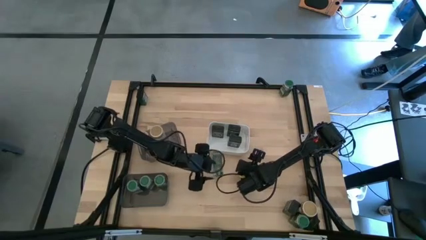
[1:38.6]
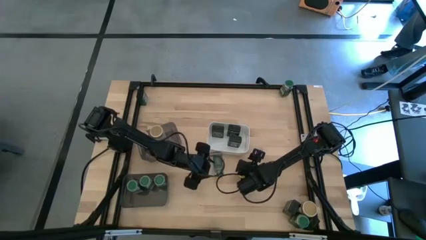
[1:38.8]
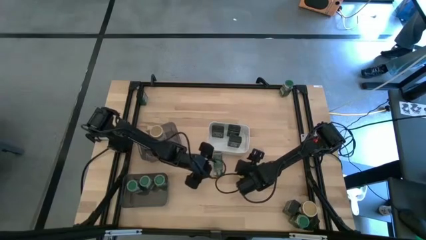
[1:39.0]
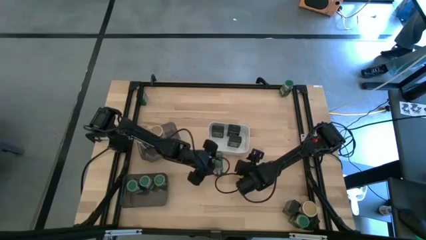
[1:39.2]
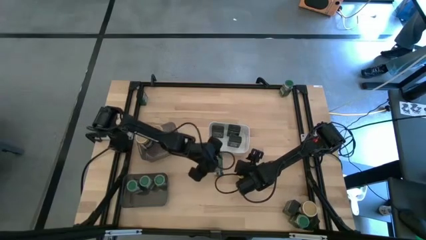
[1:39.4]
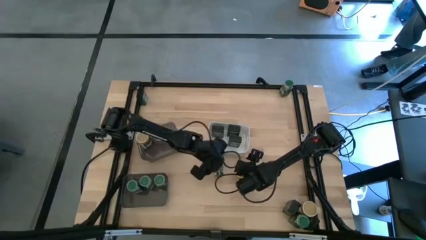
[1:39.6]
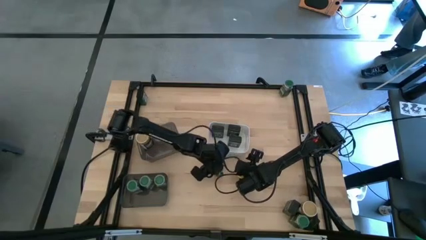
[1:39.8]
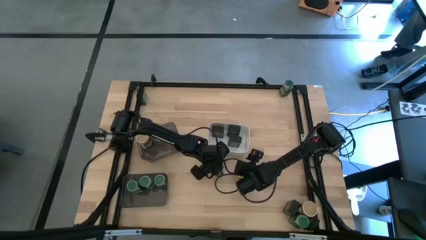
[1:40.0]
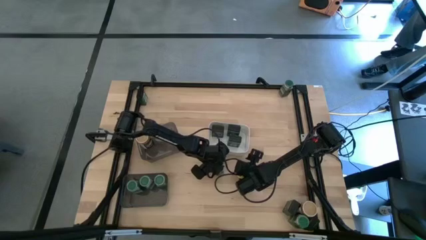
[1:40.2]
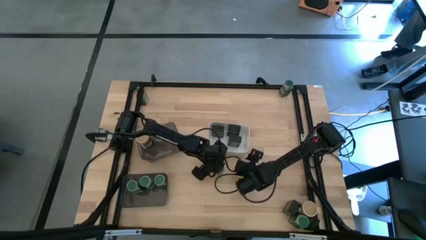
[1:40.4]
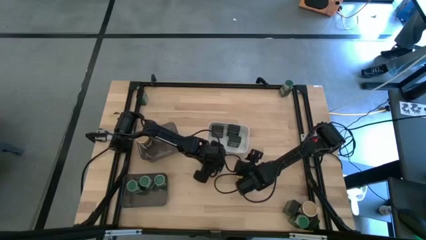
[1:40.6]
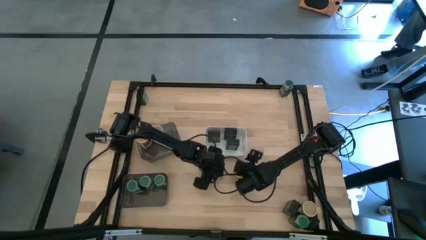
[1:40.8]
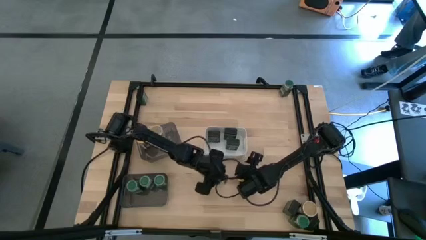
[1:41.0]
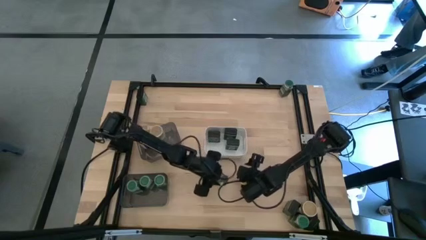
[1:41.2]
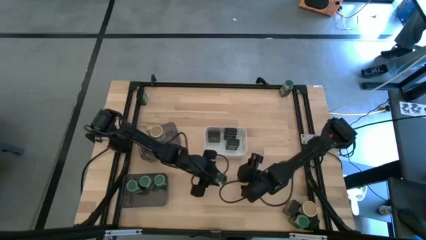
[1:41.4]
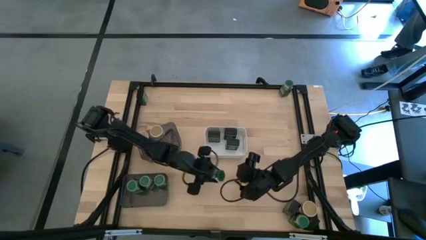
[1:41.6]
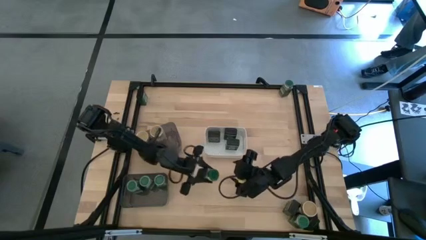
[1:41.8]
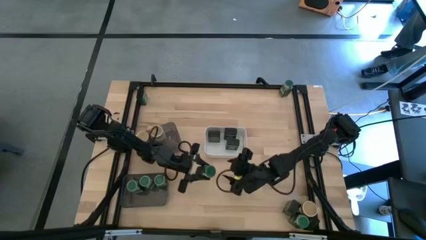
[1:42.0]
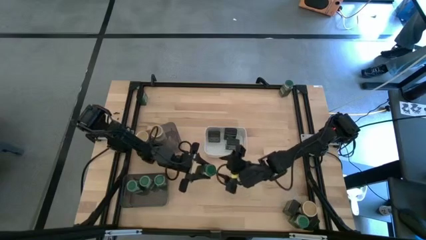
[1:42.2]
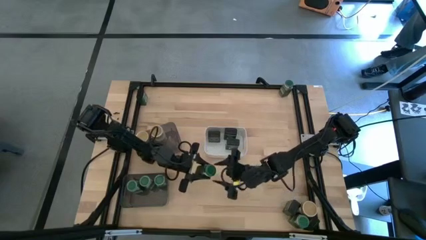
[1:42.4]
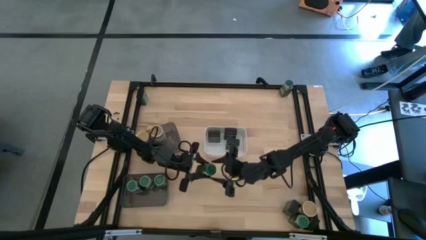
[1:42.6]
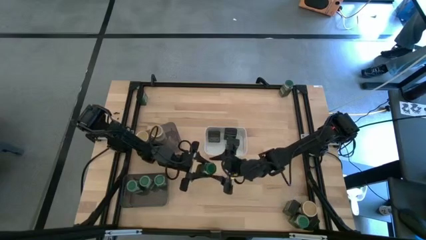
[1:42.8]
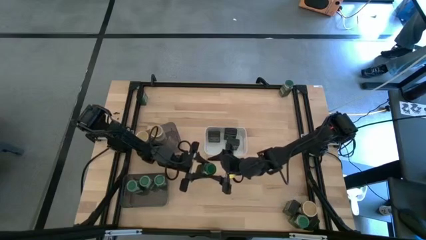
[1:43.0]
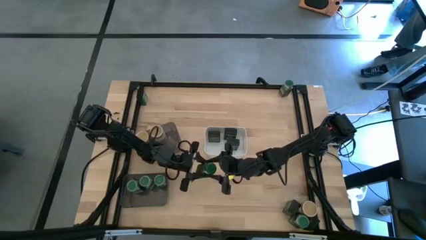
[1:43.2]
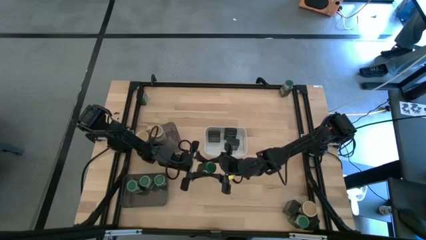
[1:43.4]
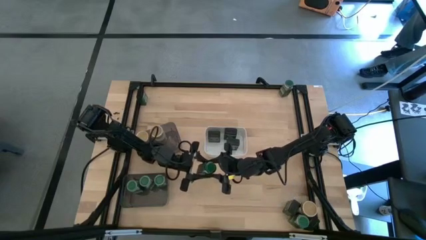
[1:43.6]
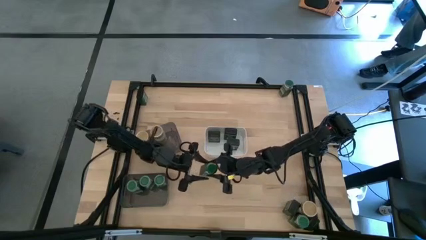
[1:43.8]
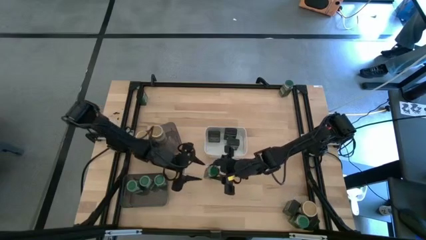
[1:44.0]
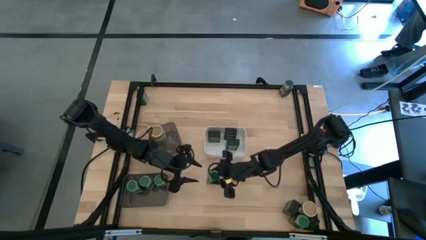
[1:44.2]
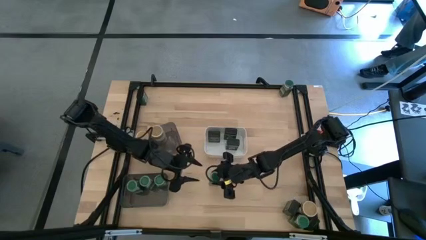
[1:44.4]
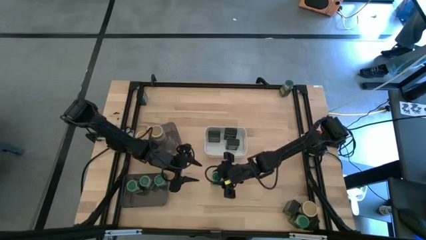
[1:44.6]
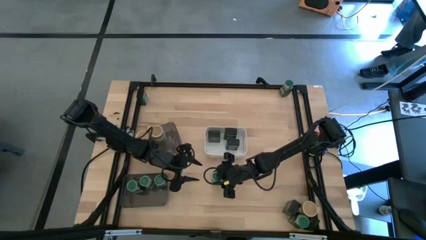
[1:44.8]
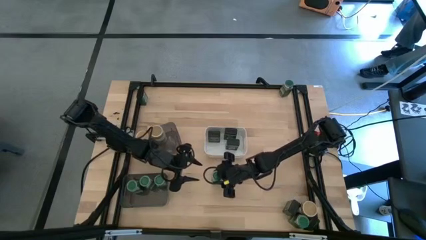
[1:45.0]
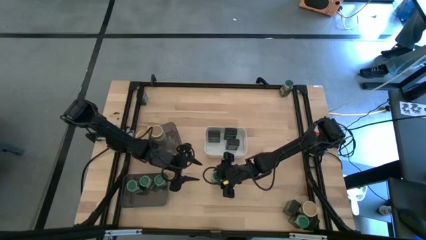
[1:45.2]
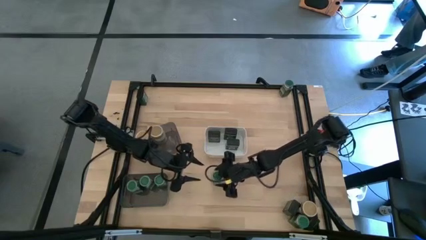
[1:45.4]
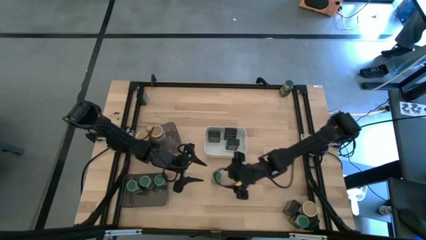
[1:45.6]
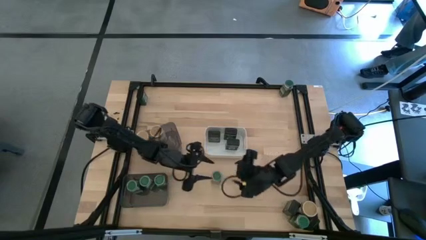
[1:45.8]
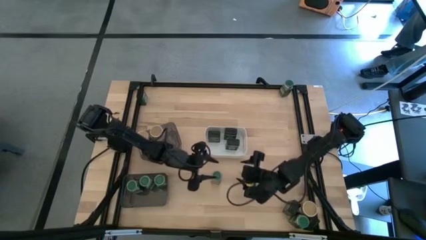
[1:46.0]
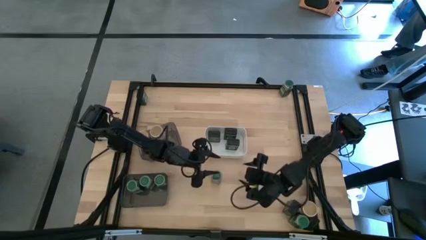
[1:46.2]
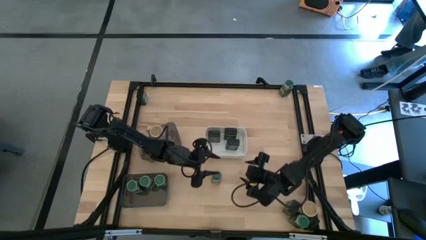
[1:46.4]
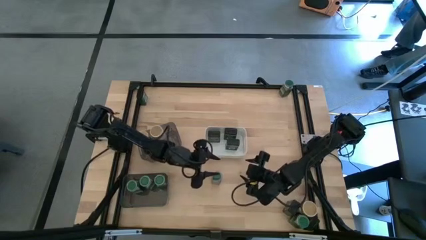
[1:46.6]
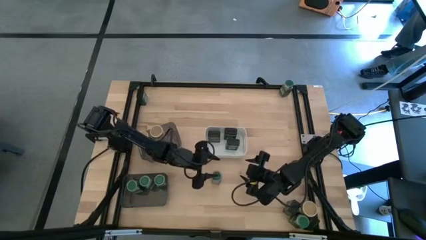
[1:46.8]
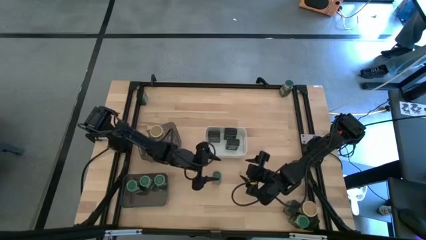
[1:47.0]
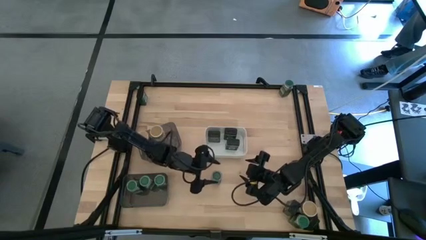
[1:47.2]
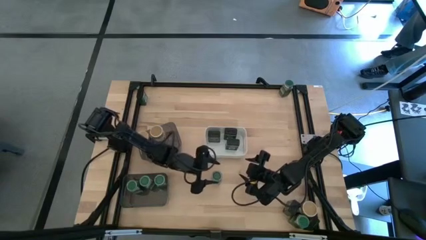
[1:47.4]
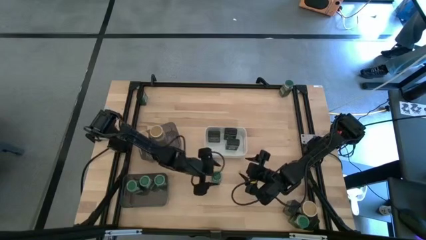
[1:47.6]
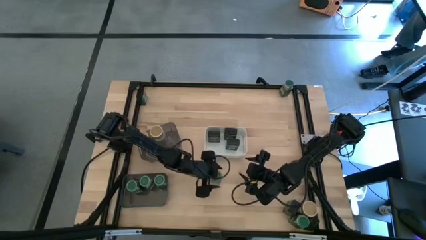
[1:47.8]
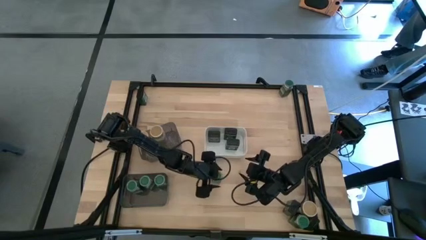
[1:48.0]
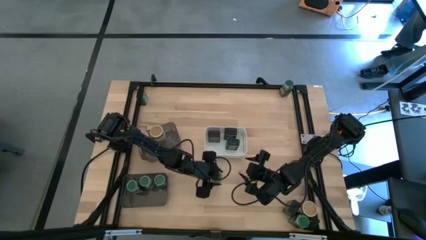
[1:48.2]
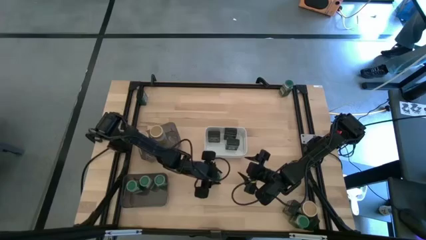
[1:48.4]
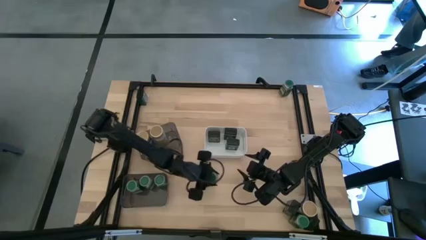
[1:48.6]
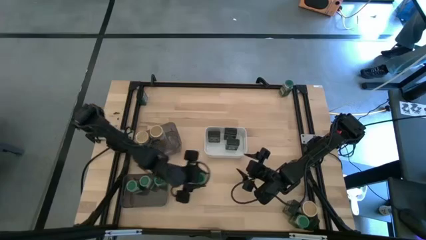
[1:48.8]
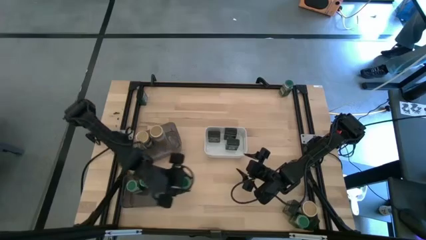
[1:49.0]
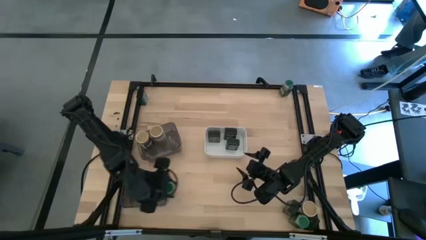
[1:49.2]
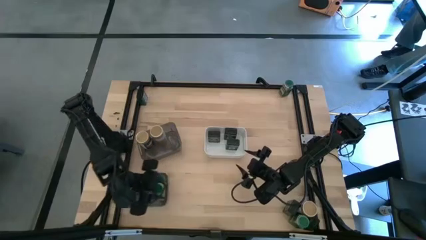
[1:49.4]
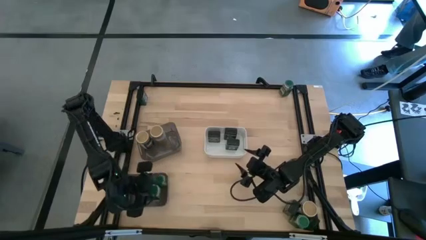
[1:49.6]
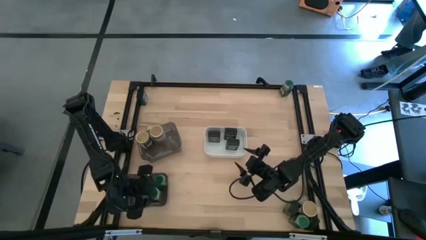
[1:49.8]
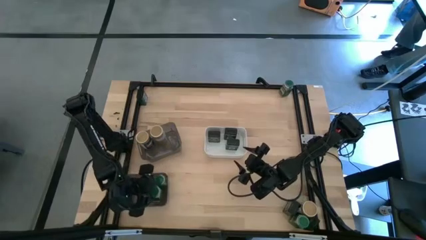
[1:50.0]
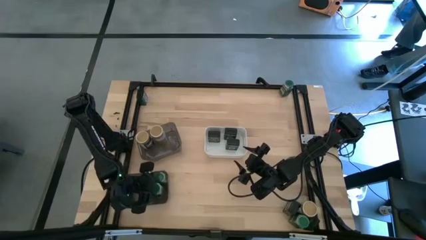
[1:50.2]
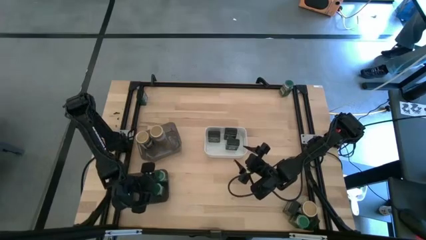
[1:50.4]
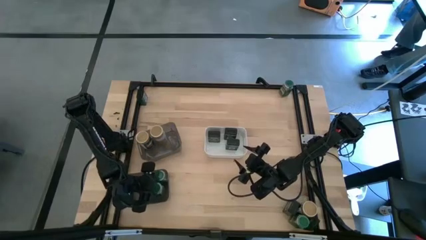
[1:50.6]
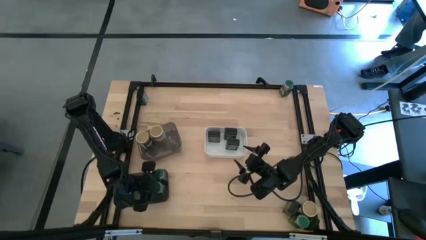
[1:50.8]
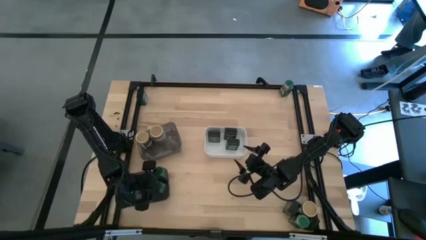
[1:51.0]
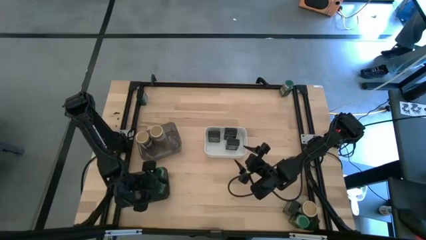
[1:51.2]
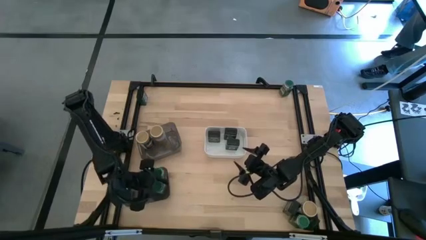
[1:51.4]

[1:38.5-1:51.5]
Task: Sort spices by type
Put the green seasoning bottle into the bottom black bin
